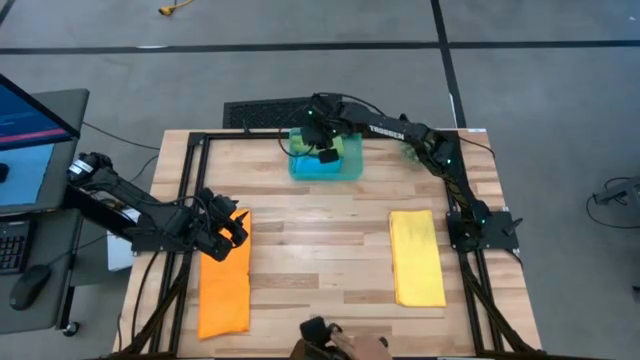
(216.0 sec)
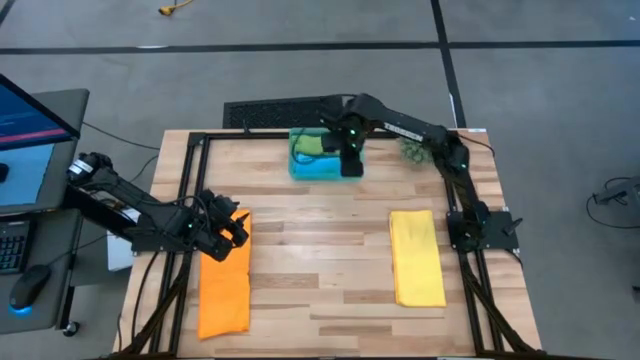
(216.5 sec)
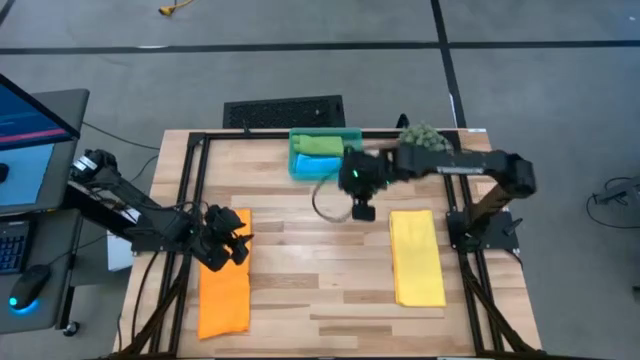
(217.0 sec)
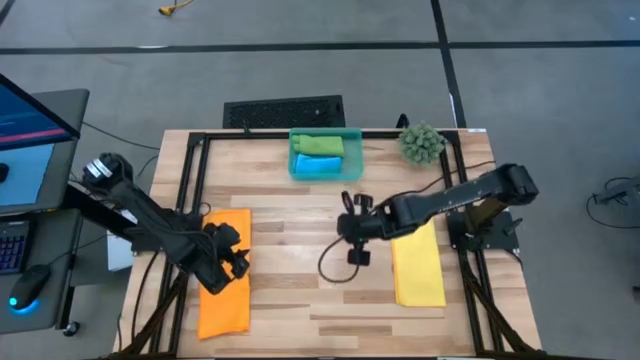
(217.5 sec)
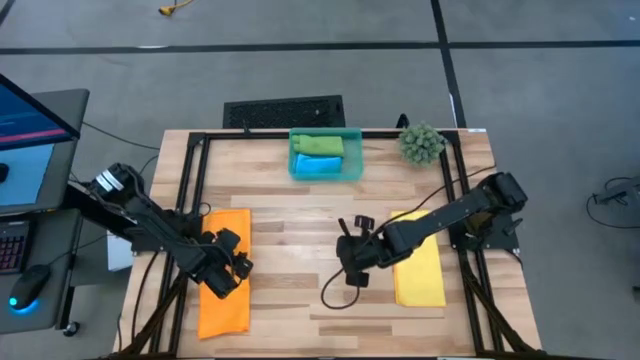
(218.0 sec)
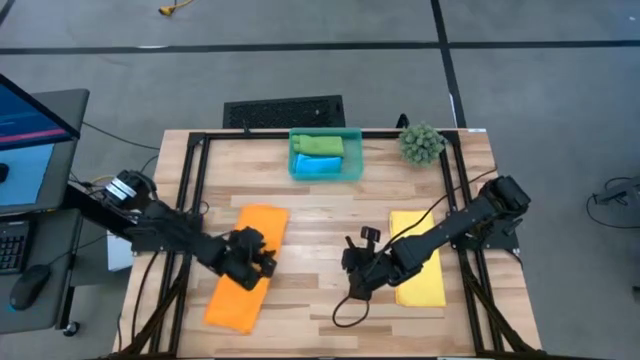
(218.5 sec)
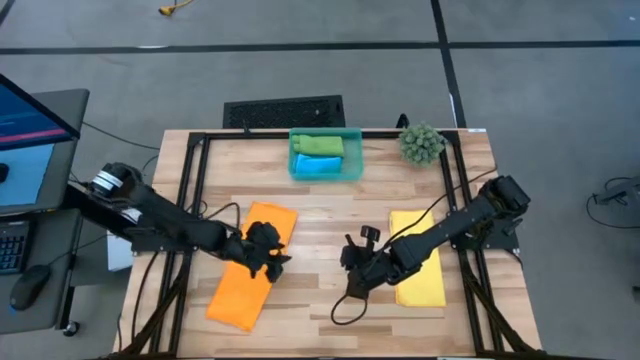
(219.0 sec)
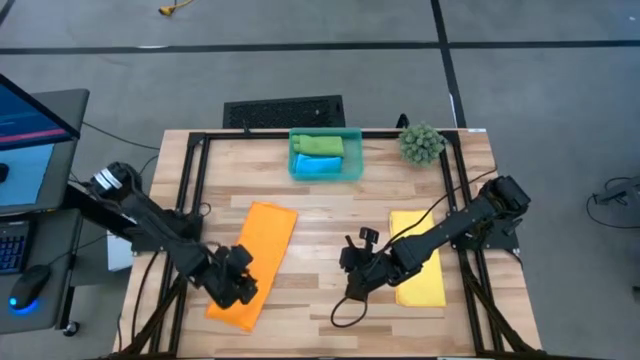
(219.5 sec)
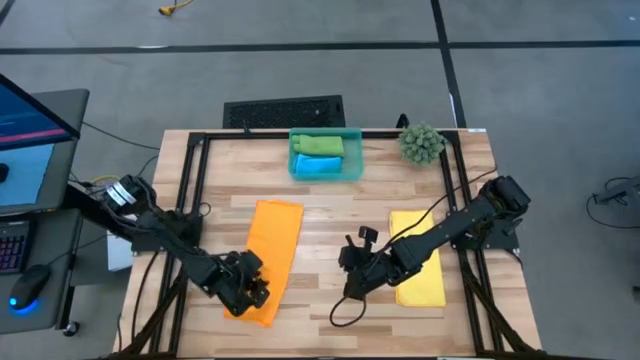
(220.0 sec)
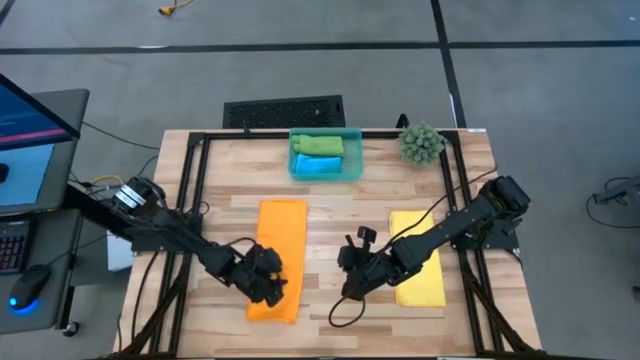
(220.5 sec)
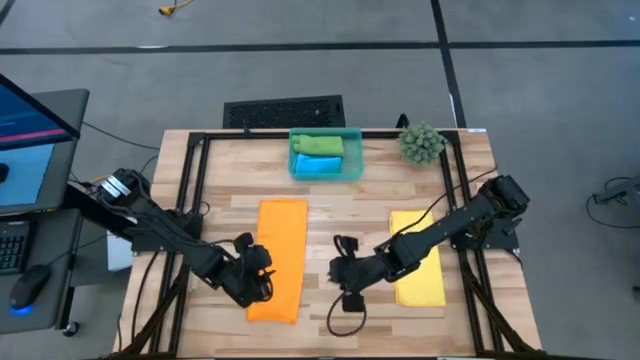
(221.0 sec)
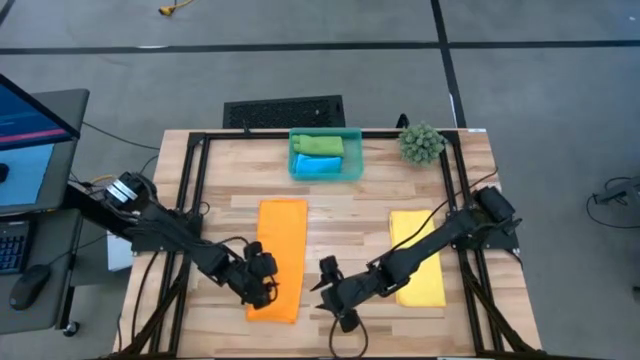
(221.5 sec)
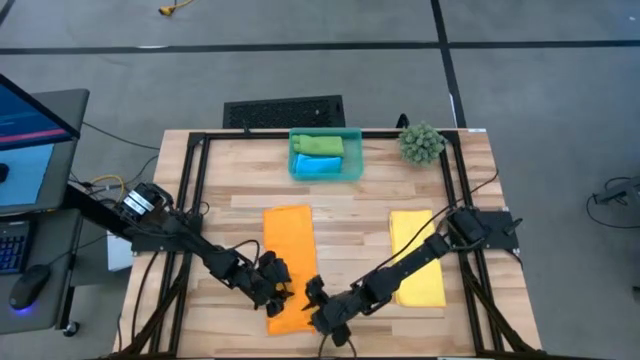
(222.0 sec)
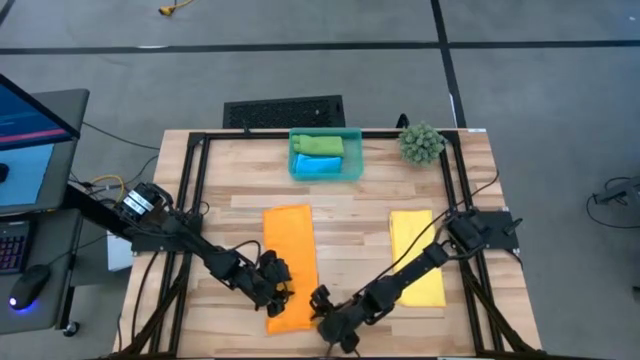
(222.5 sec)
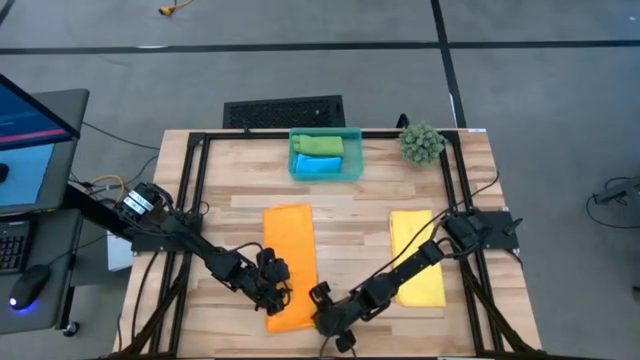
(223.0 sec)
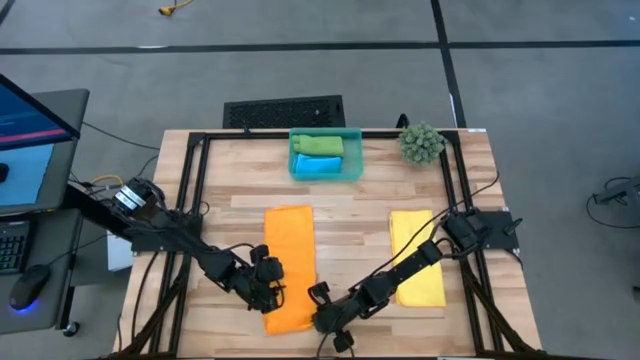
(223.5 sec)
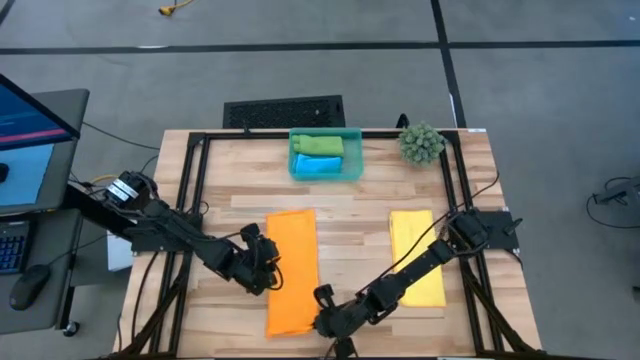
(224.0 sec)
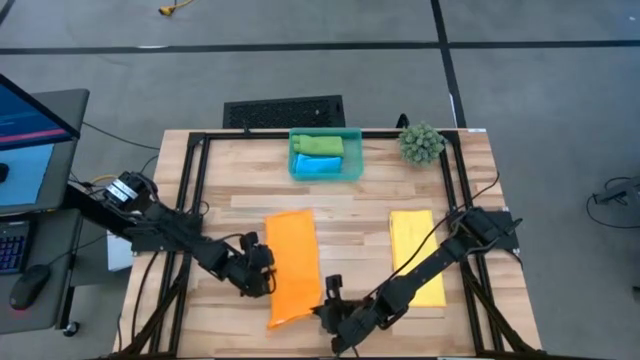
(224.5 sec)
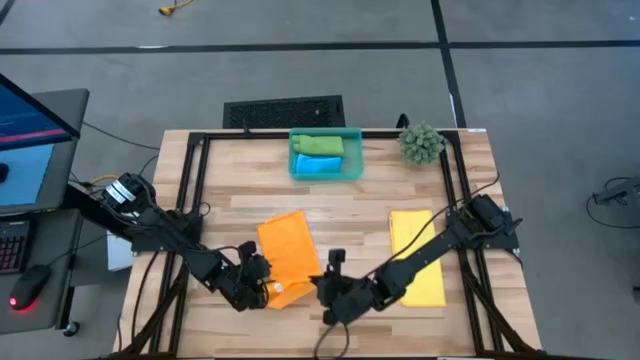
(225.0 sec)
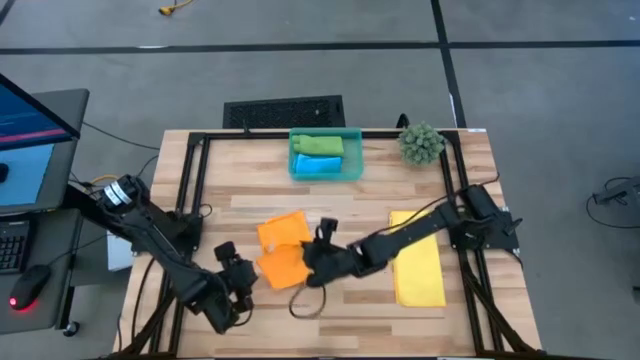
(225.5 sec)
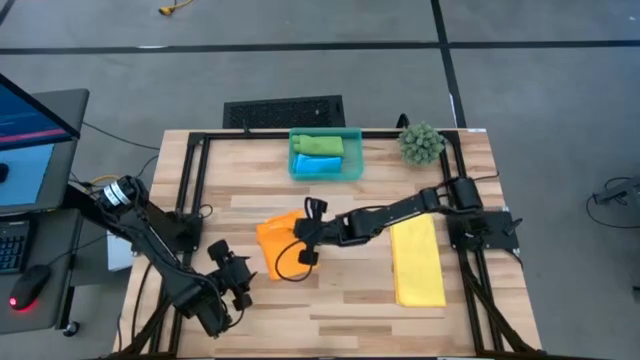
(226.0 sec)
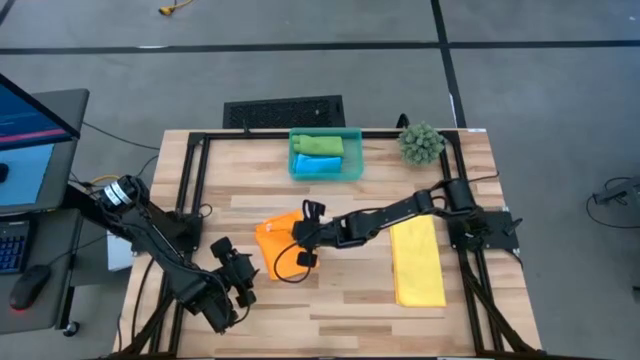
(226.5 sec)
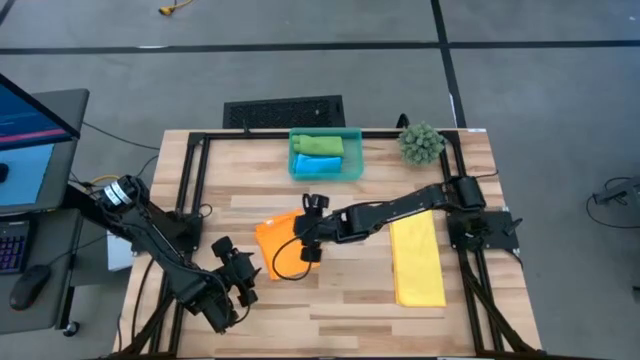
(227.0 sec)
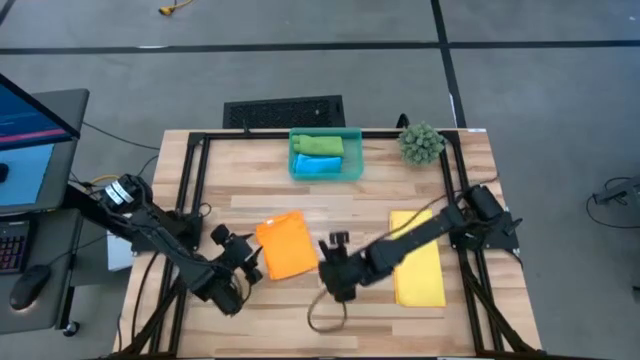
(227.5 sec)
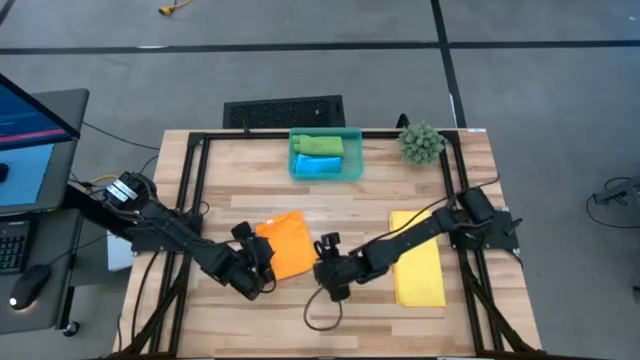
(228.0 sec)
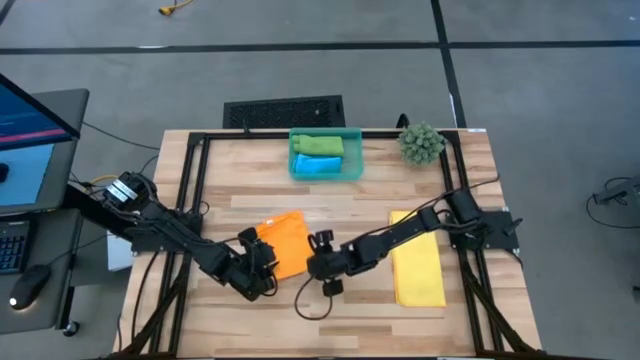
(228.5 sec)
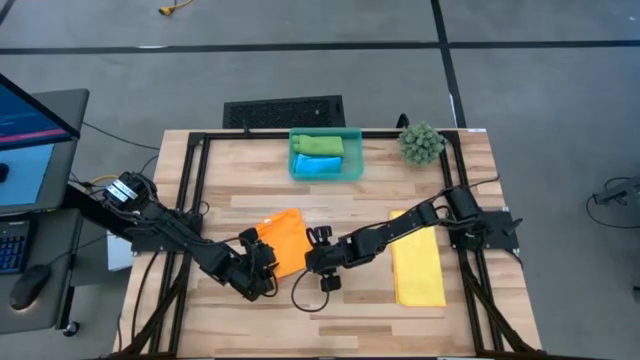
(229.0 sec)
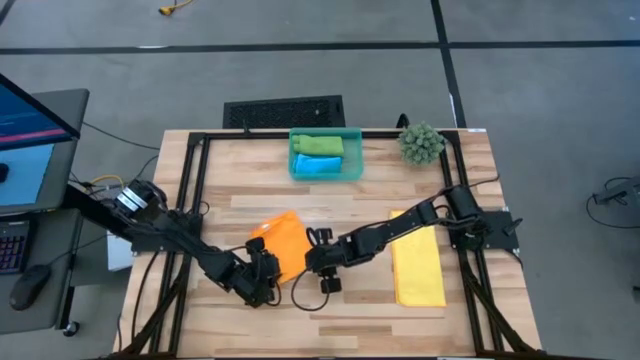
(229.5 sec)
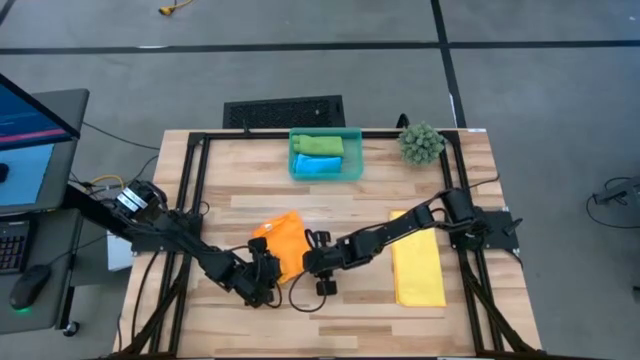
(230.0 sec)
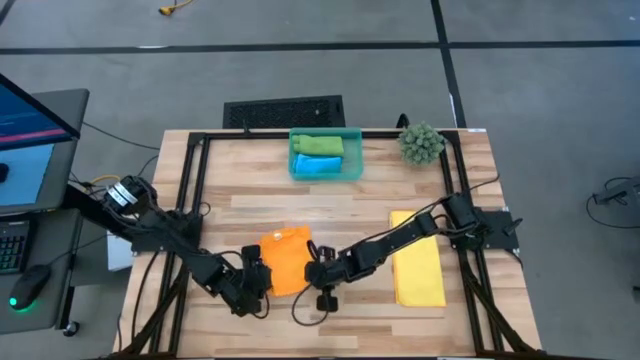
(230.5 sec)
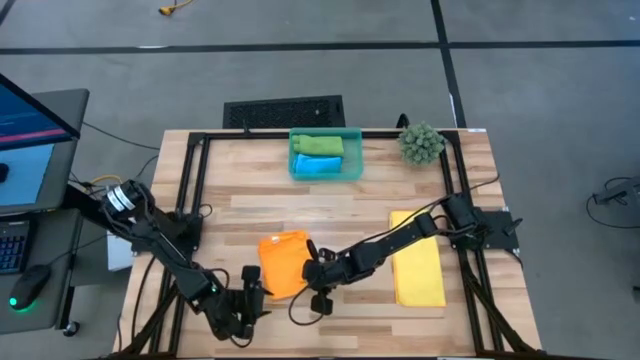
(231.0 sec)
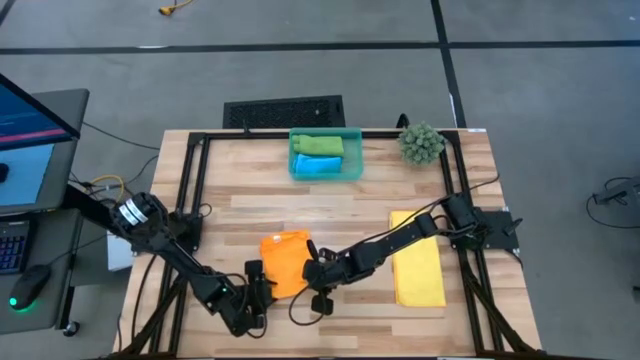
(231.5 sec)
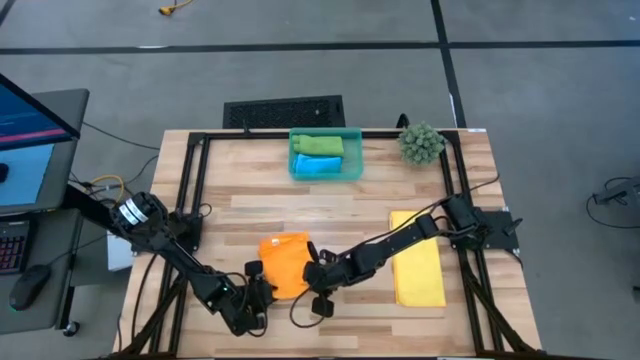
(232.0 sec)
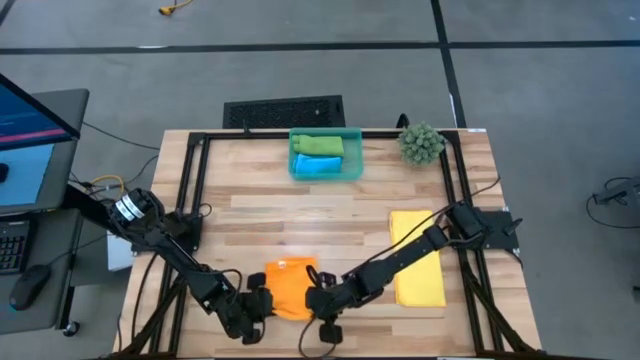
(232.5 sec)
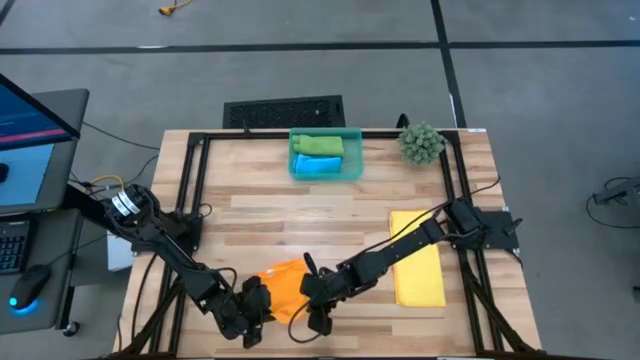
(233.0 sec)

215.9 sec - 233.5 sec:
Task: Roll microfiber towels into tight, uniform cylinder then place into a basket
Roll the orange towel

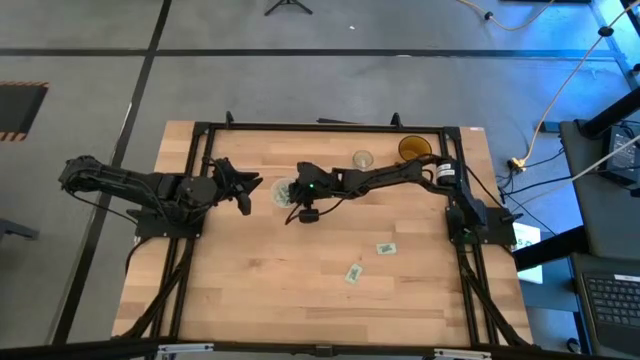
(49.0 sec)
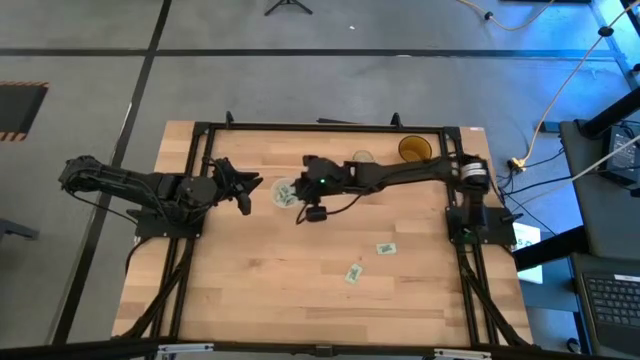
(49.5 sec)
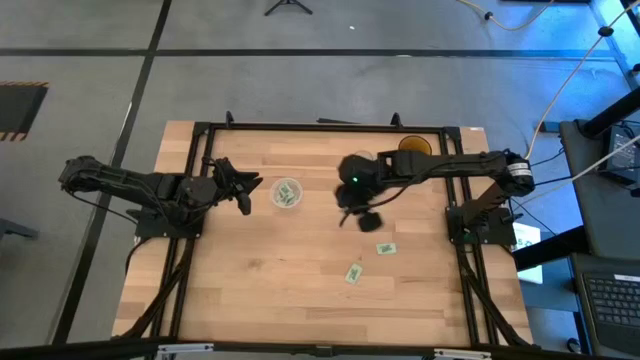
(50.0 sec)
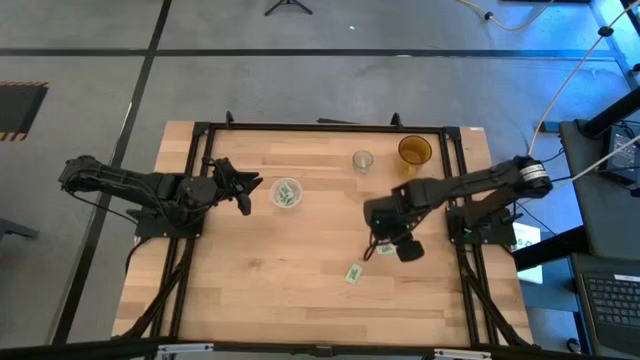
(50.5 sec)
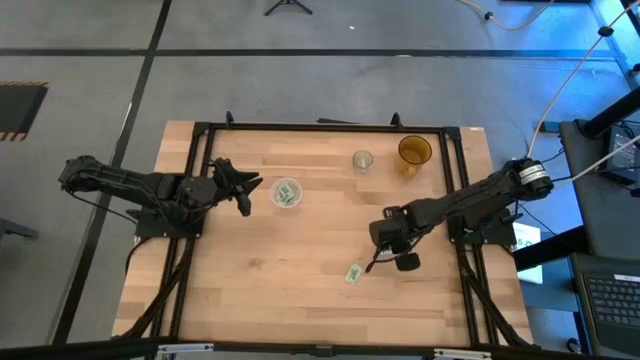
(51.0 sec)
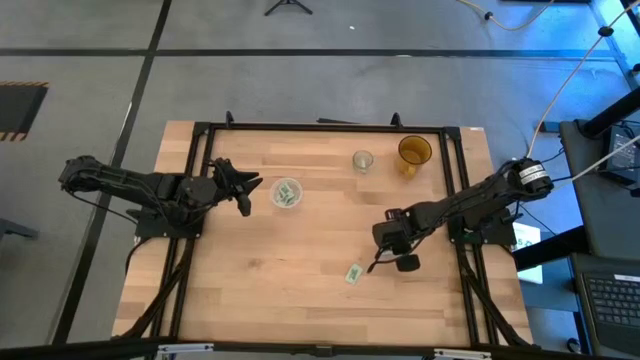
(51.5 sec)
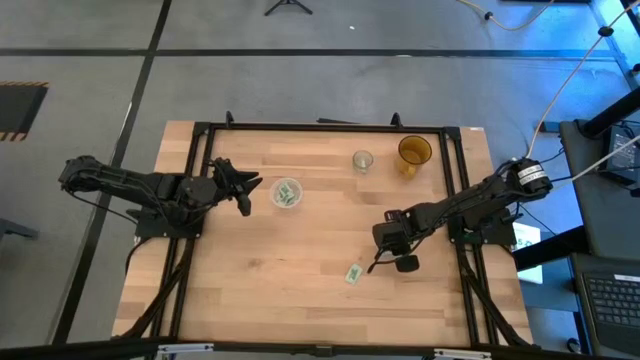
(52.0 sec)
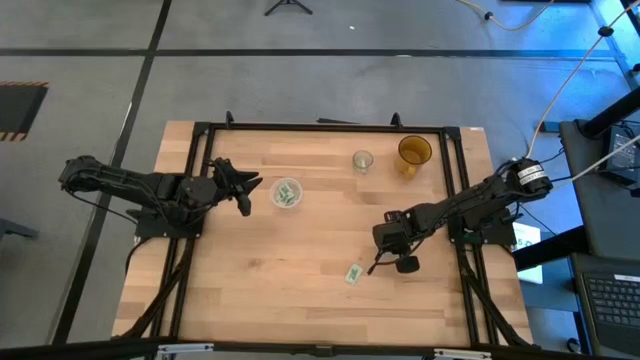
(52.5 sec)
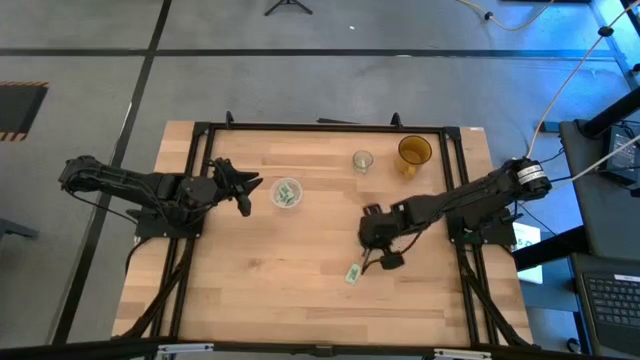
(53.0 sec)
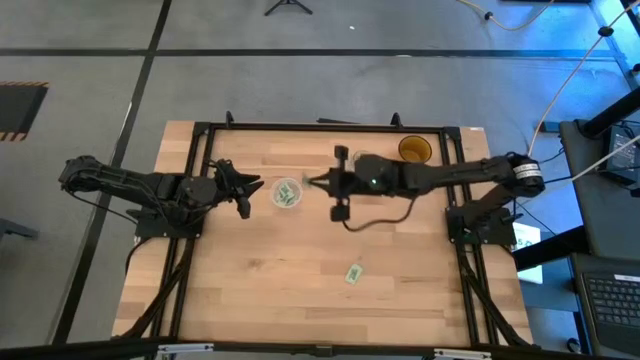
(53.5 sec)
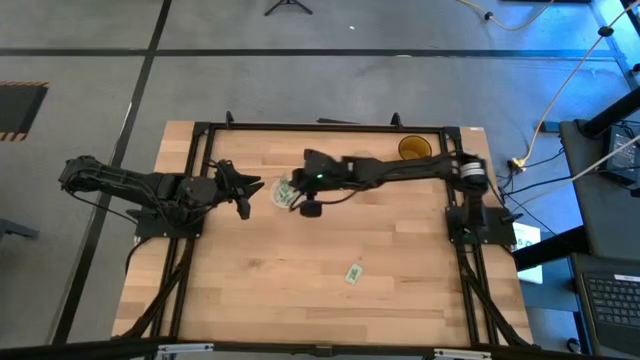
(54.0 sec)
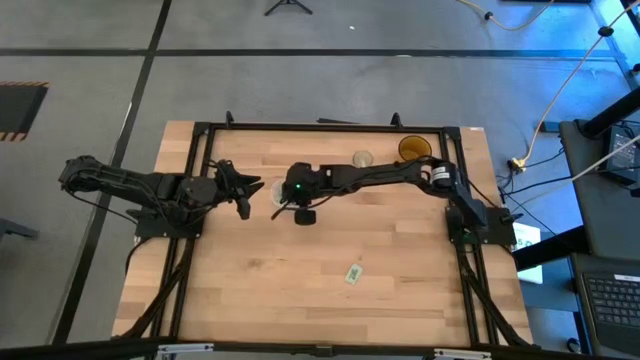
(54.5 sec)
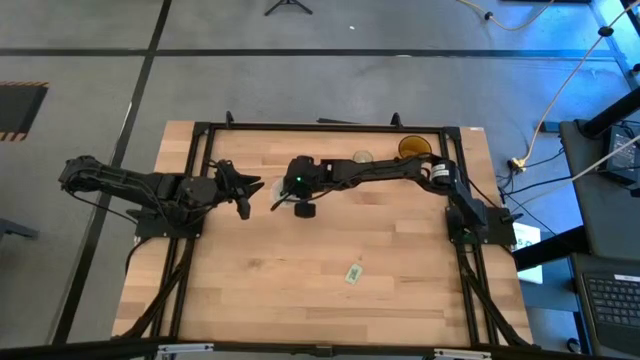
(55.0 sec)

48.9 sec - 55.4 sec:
Task: Pick and place Stevia / Truvia into bins
Put the stevia packet into the transparent container
